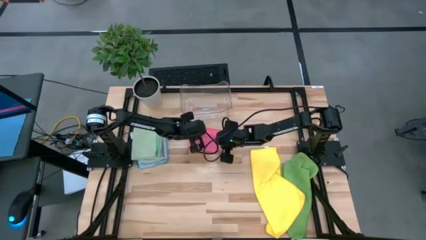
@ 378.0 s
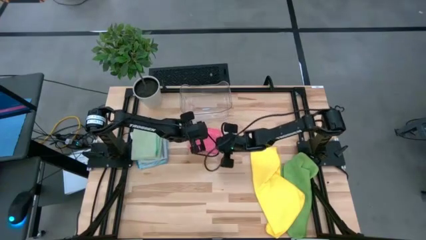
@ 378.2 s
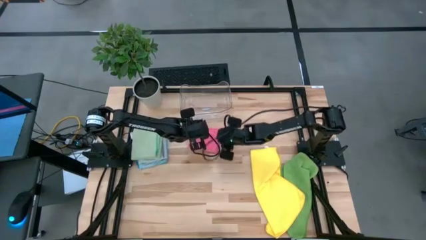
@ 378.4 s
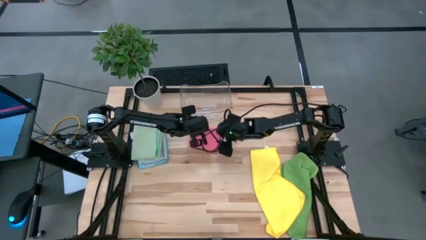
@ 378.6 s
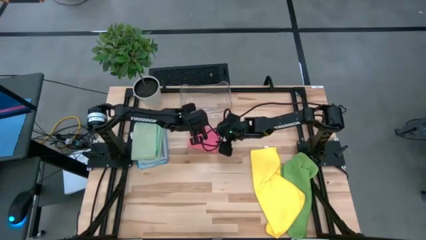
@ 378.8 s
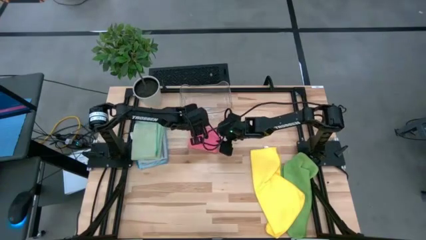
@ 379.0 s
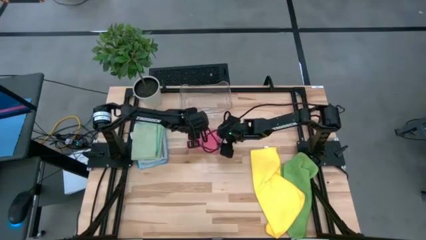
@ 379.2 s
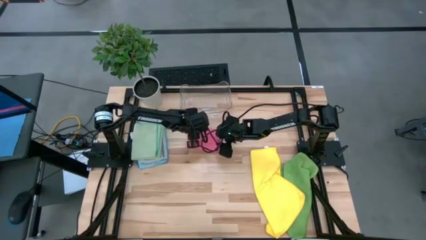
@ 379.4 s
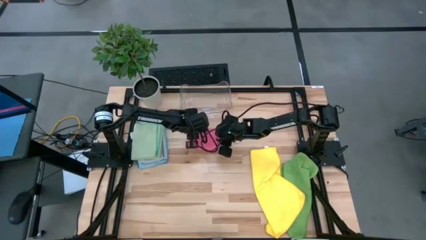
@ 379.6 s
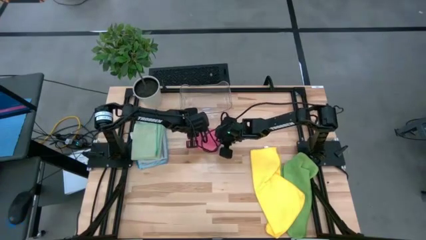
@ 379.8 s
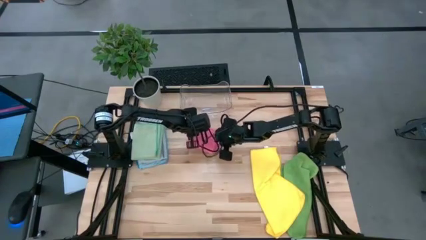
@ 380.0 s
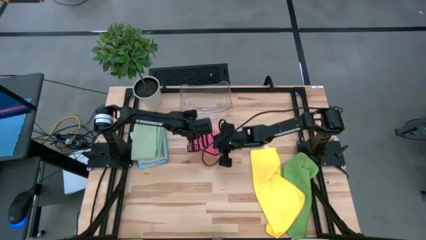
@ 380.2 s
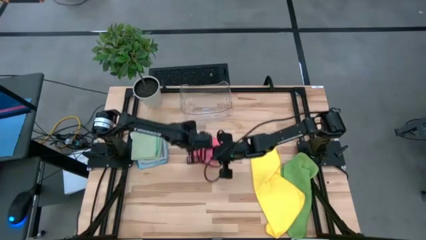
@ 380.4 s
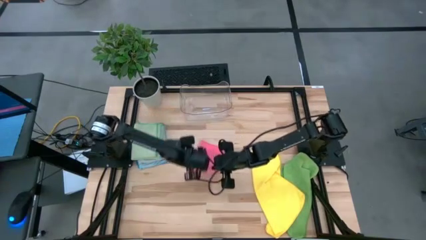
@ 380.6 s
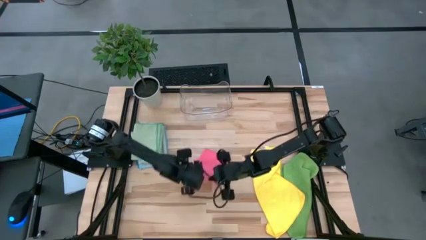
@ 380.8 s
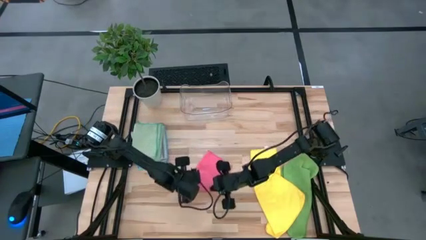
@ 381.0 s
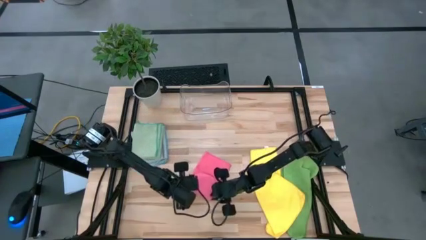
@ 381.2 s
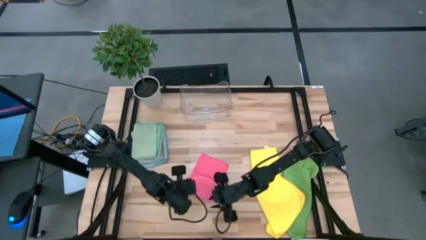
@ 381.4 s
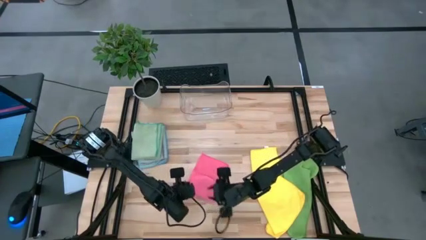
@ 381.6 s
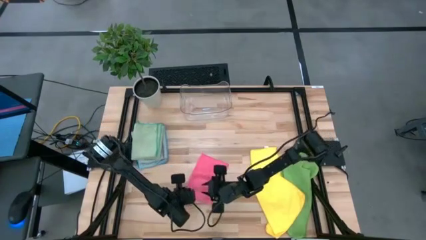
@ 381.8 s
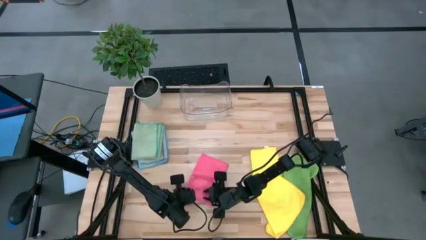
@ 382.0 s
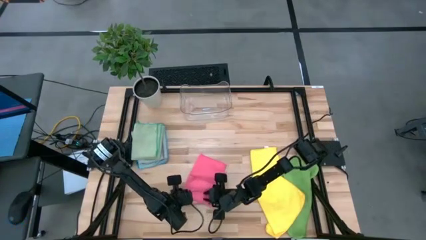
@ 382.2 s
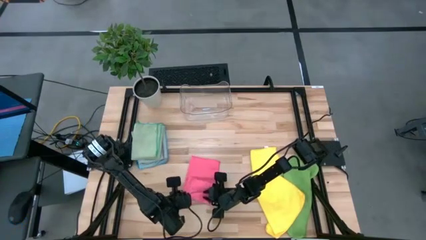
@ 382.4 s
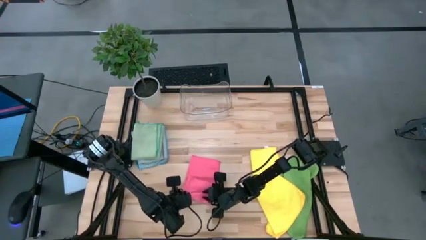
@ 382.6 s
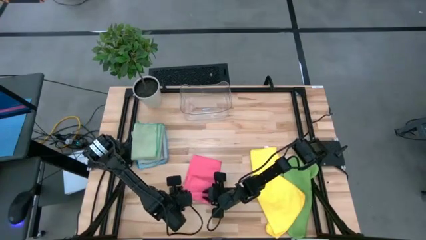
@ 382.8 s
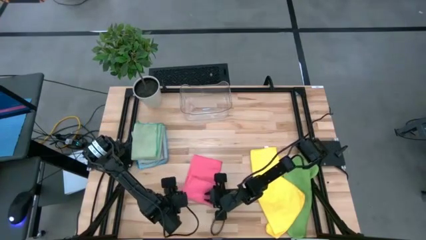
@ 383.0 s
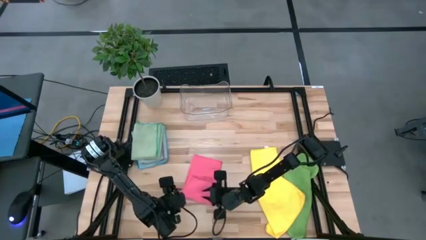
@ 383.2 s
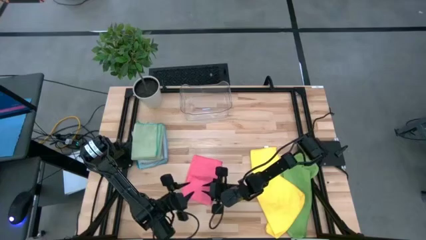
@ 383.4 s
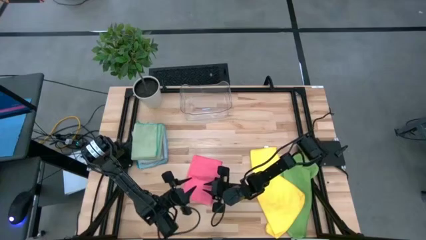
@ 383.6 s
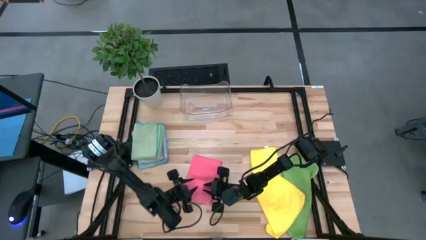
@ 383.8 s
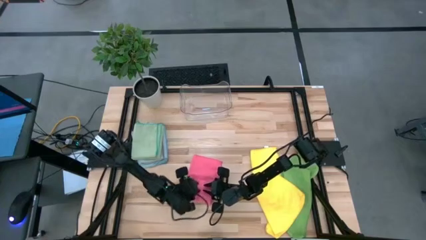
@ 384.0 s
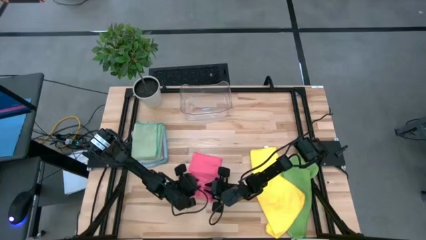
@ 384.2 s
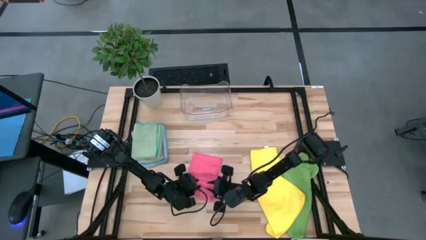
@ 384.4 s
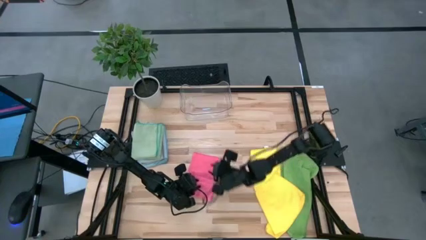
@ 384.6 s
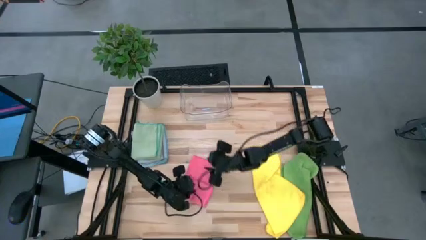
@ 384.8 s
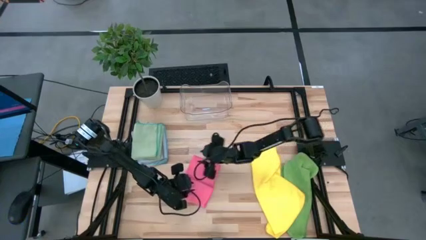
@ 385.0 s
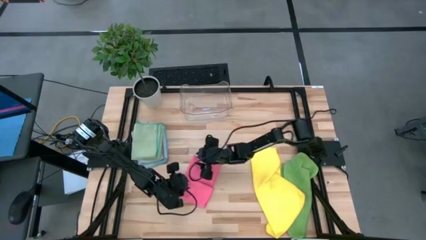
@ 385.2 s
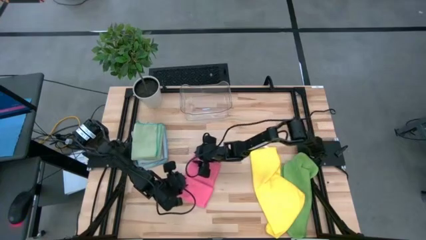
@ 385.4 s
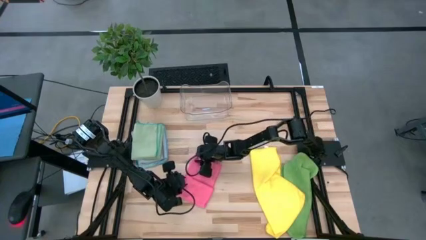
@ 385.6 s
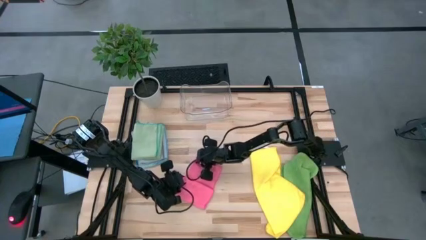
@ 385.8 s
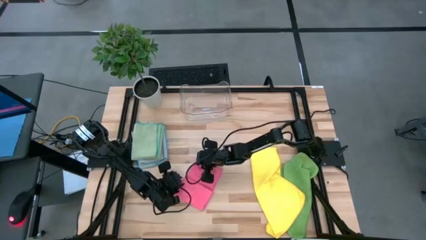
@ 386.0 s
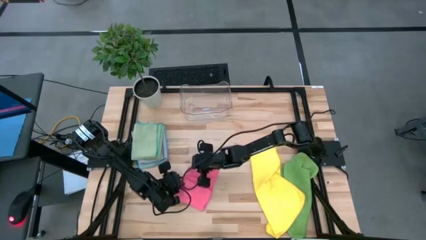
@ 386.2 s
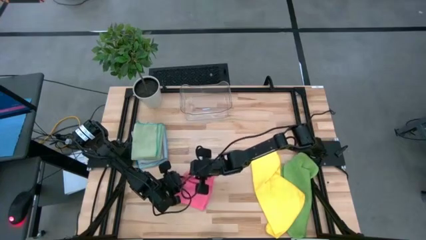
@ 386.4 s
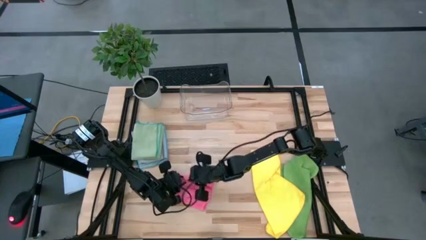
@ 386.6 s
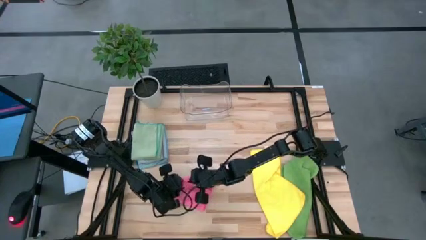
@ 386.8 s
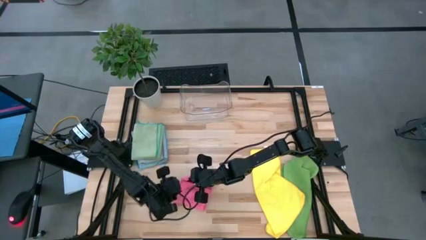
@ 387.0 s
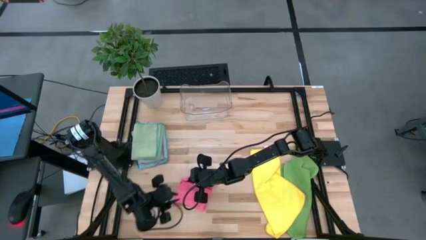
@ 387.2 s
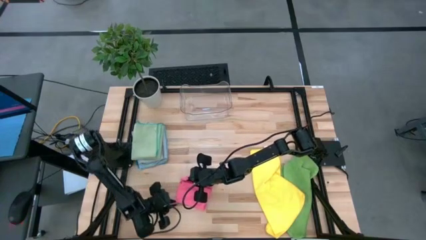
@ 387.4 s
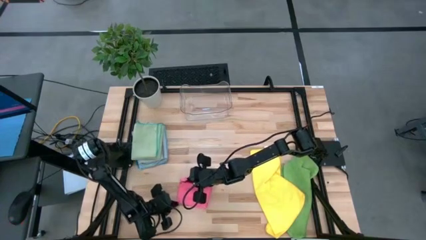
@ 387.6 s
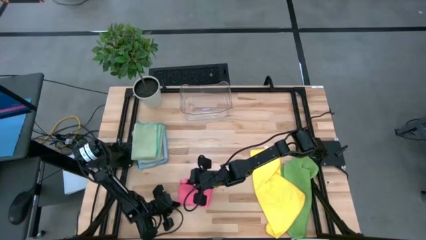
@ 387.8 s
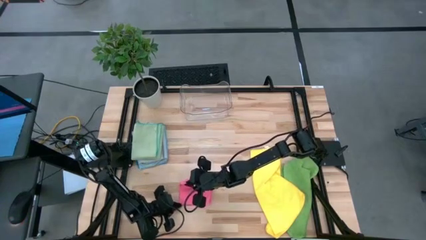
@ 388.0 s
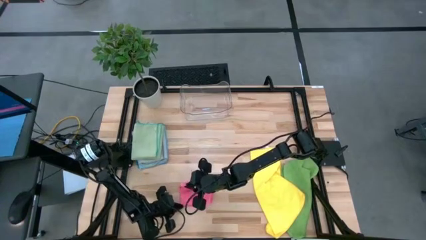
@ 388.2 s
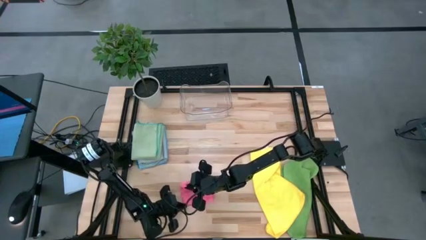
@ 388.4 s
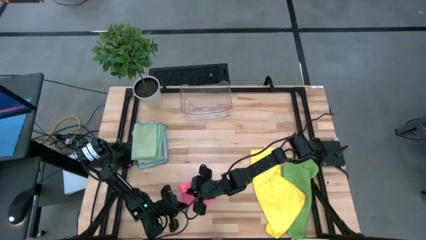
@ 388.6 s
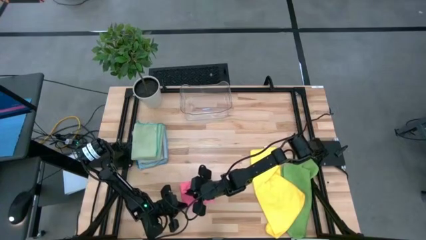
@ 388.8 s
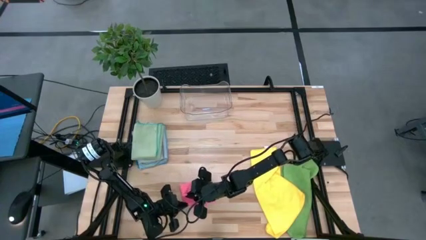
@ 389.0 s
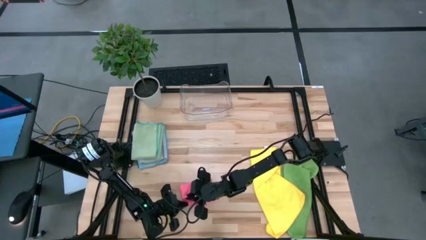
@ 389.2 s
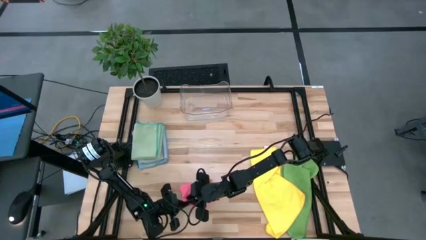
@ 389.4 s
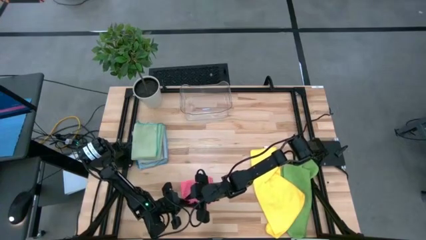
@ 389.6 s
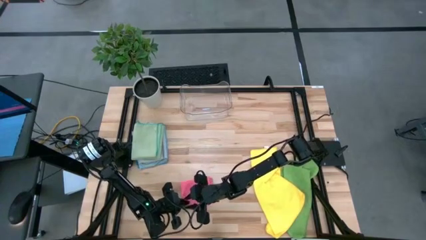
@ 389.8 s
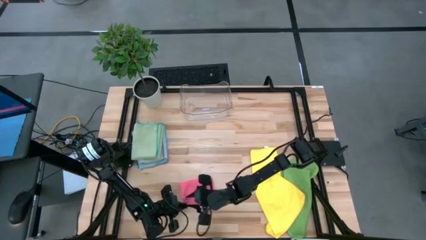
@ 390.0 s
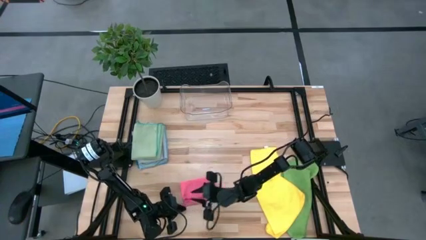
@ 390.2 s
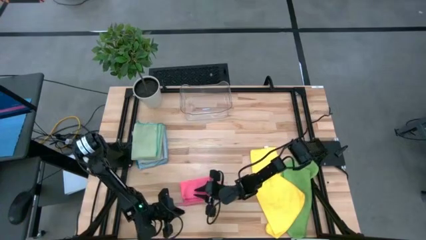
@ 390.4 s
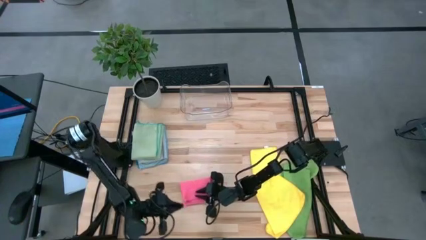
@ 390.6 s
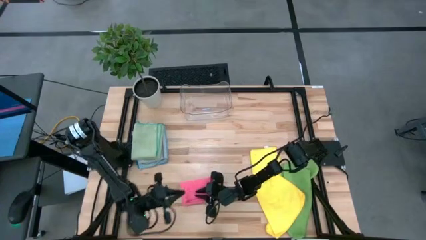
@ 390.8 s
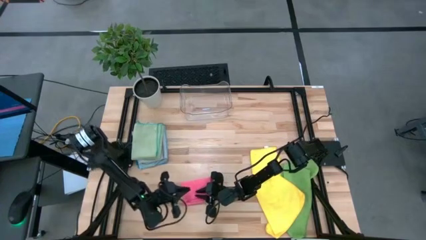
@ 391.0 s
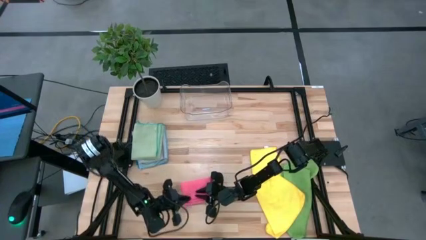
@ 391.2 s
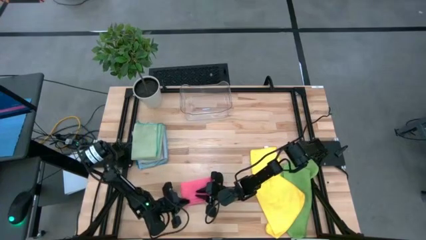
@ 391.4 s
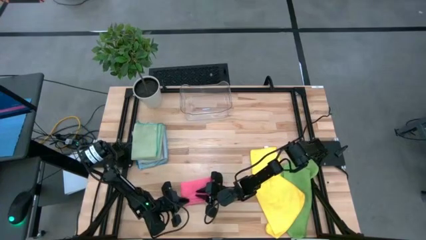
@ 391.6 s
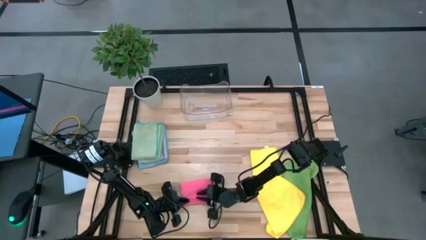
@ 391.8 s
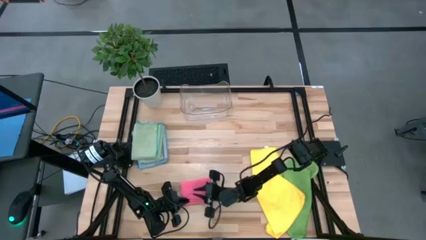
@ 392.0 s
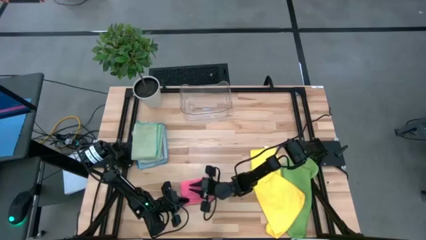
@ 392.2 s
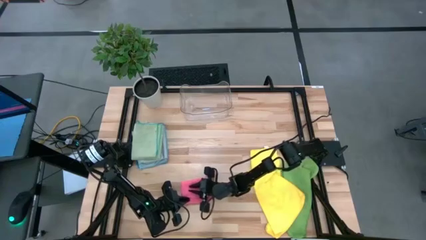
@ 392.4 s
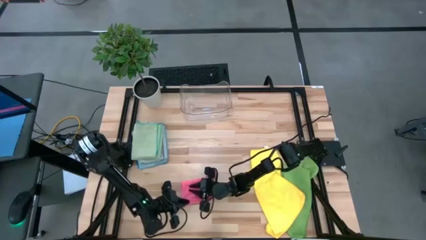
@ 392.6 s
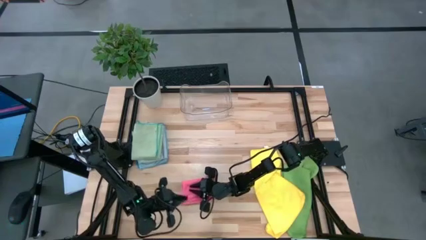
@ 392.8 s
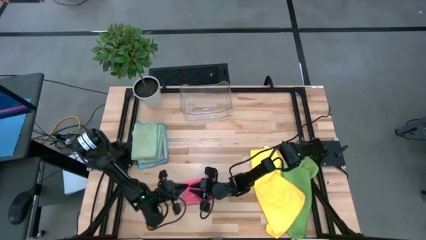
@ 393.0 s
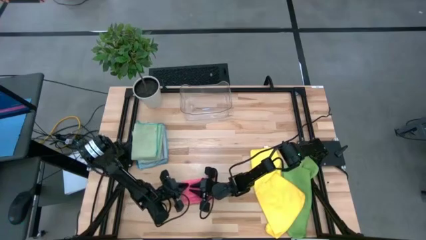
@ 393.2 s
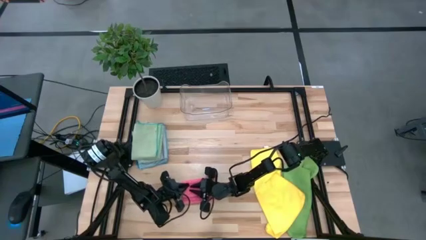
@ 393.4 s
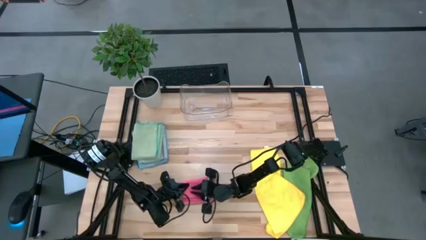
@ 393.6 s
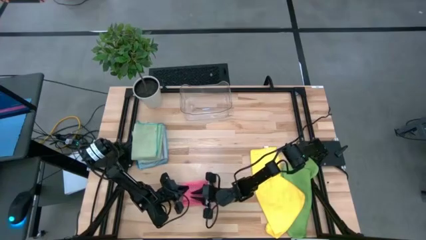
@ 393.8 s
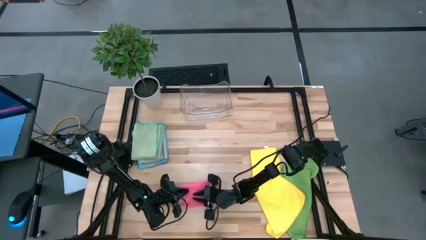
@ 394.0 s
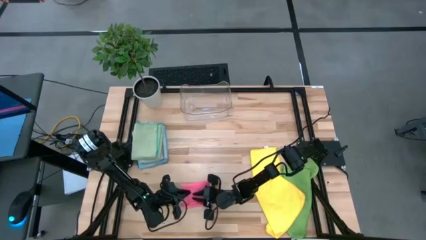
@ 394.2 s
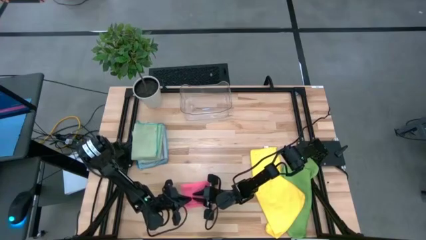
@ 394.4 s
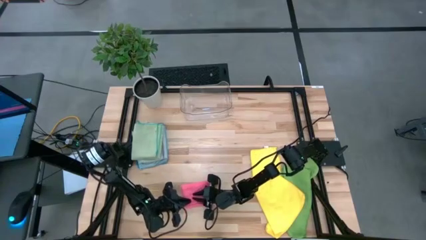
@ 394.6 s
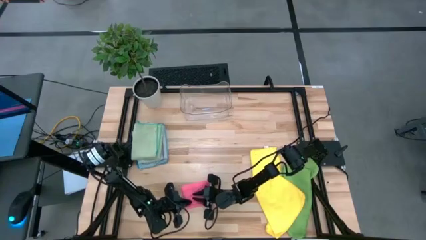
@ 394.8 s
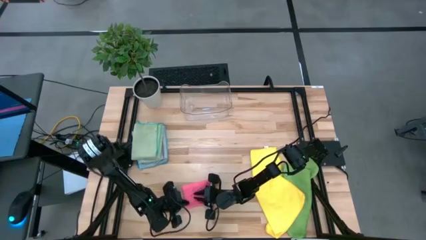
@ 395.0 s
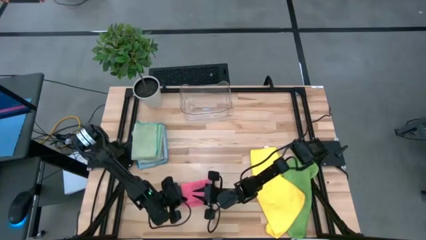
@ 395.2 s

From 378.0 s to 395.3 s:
Task: Fold microfiber towels
Fold the pink microfiber cloth
